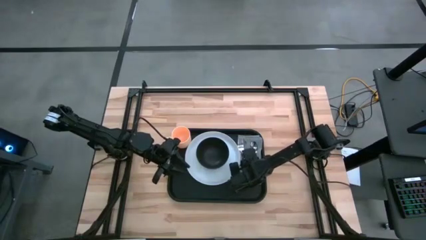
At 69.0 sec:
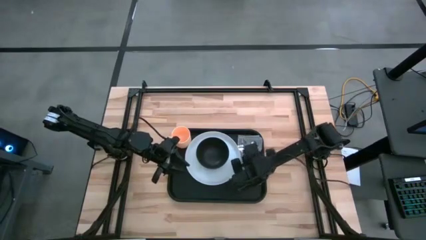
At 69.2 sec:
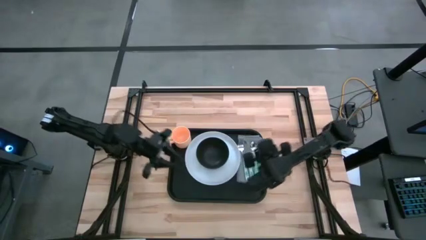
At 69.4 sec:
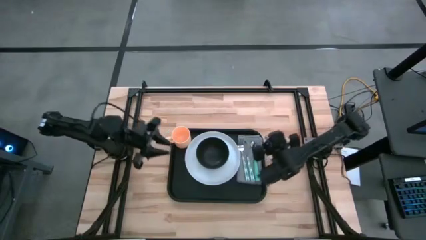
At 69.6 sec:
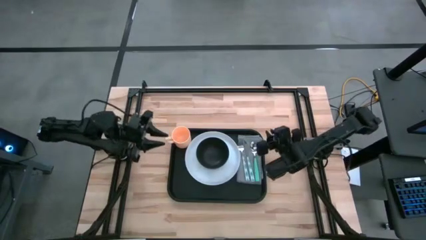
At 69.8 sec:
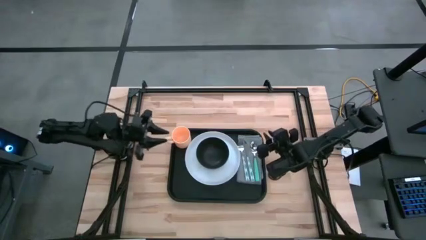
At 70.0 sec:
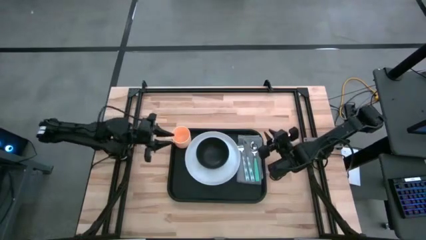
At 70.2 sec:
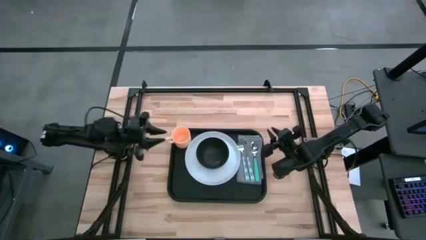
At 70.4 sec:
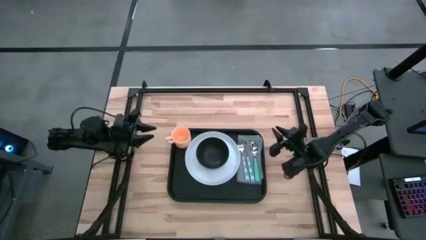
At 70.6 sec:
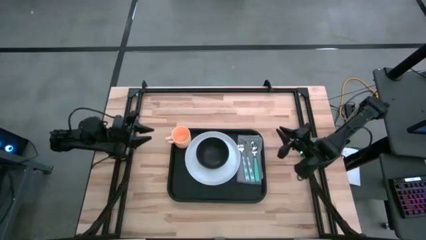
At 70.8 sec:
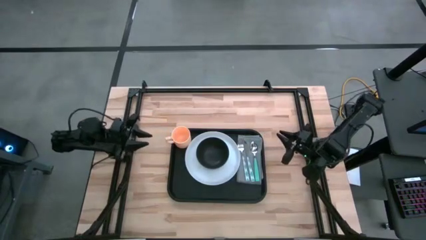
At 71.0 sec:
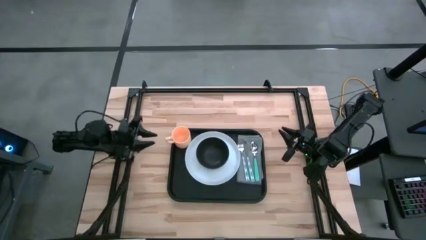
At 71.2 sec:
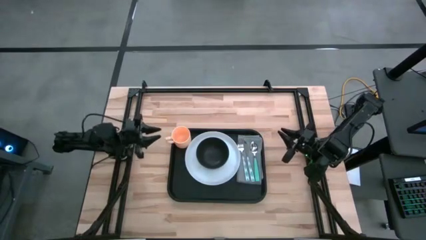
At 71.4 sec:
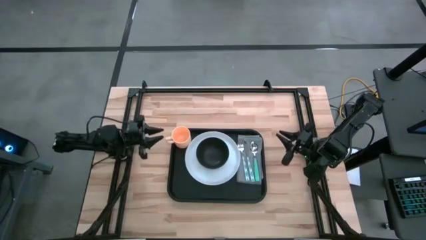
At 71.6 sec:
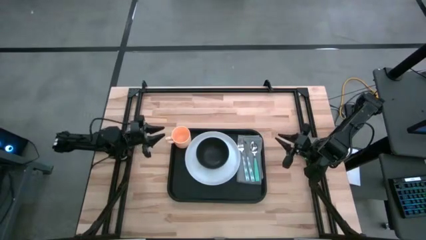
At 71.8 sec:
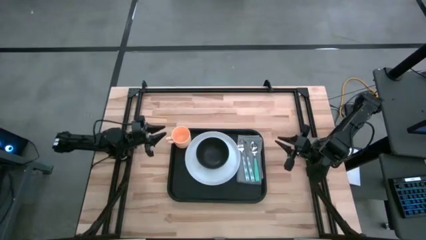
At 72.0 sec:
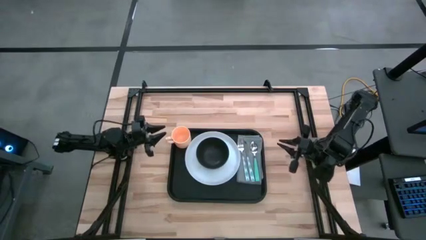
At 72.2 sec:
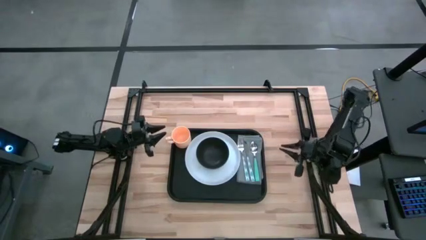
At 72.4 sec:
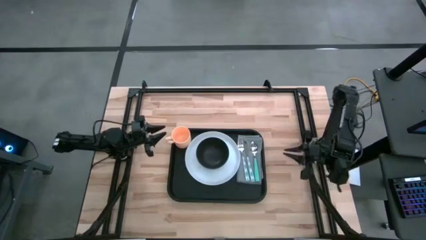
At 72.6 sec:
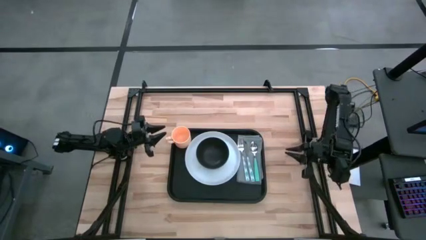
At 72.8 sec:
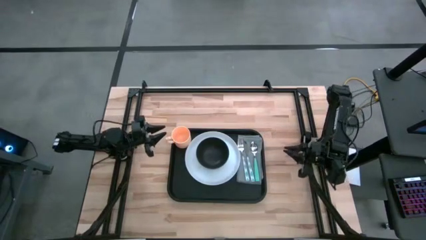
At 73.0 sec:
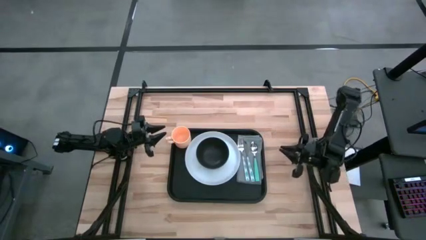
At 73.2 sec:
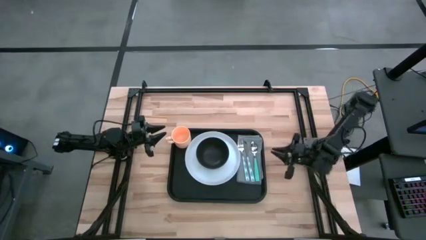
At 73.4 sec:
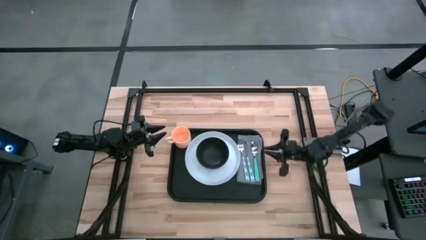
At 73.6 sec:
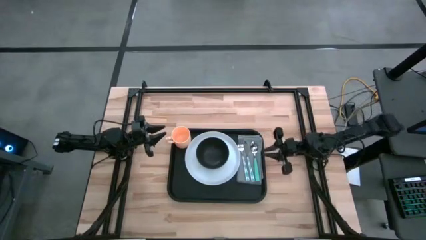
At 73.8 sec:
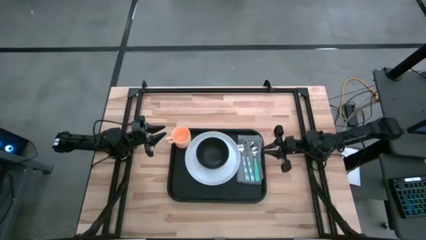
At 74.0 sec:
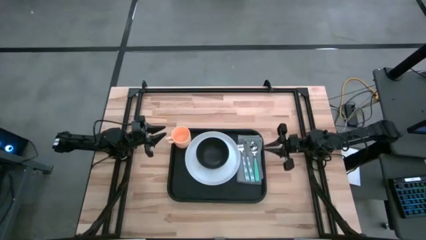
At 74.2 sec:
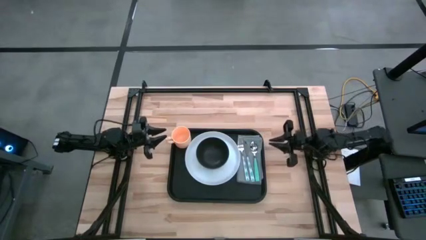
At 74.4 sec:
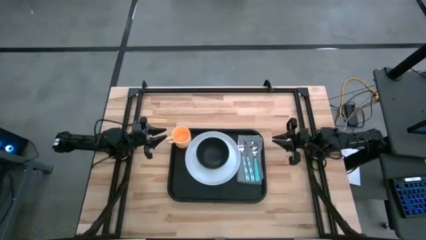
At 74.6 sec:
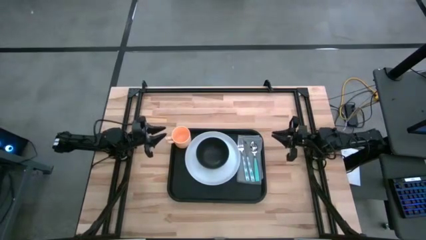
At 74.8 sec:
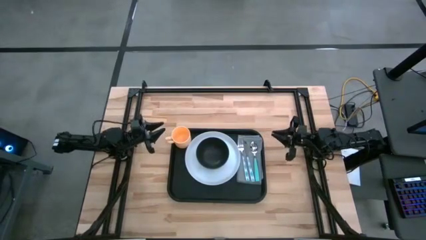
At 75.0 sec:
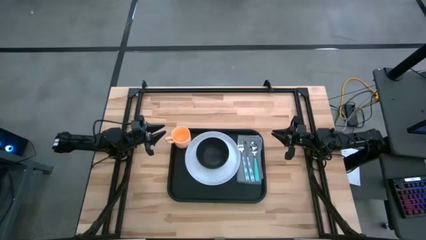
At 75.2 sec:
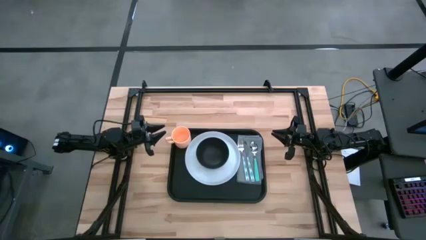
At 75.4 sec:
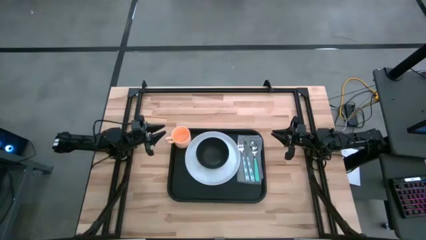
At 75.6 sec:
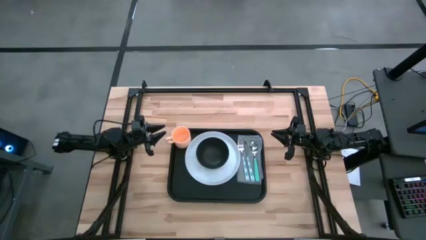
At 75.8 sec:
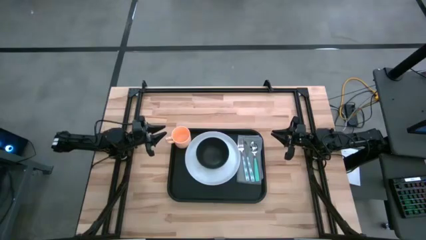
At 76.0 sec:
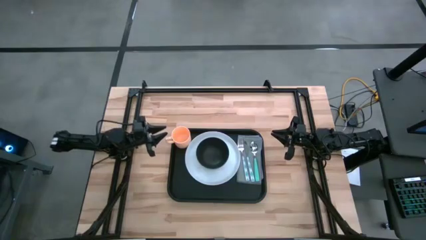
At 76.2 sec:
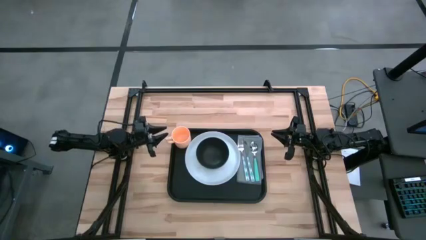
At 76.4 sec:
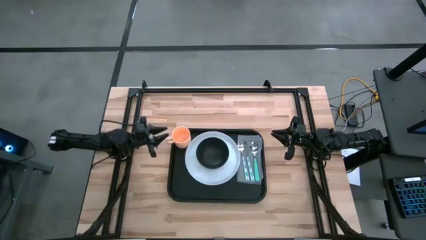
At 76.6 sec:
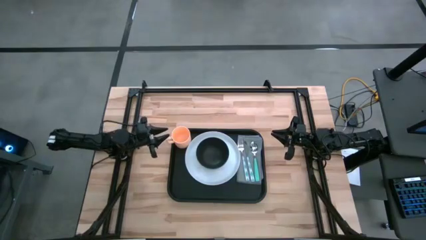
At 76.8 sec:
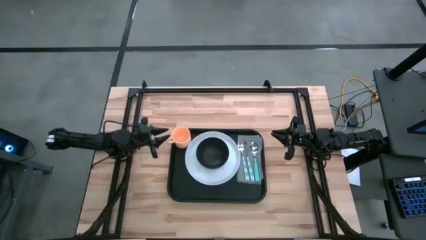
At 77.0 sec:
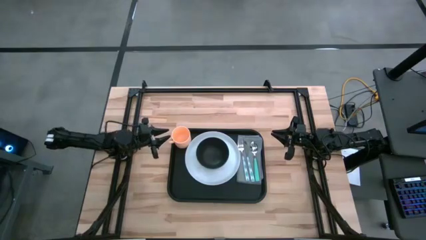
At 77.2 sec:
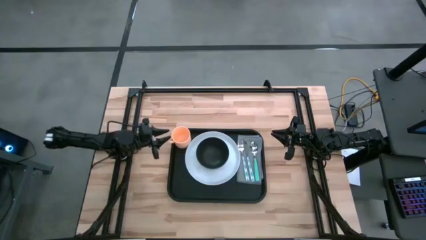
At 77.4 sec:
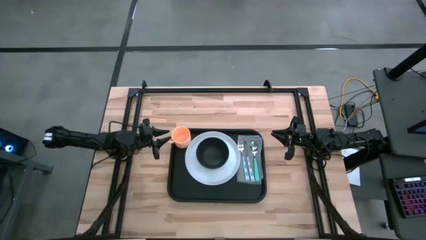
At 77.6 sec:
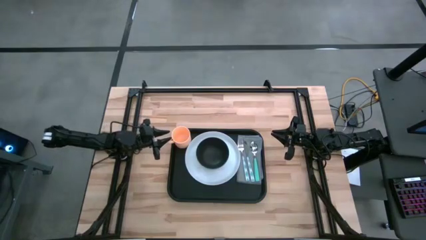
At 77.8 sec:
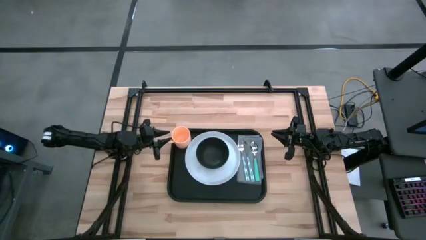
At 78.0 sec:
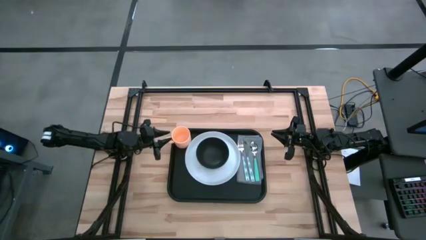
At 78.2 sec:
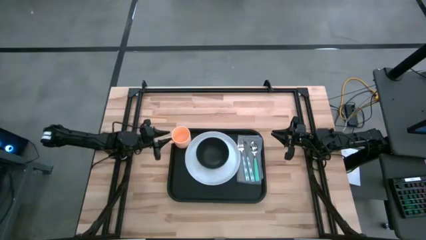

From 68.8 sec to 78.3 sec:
Task: Set up tray
Return to Home Position

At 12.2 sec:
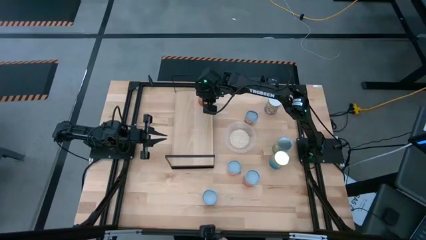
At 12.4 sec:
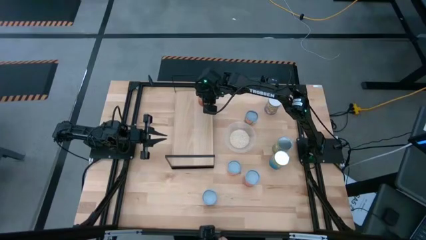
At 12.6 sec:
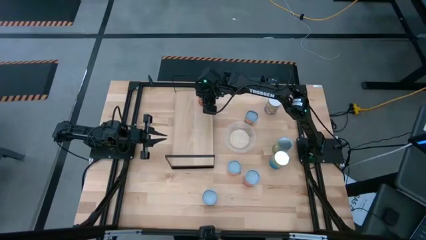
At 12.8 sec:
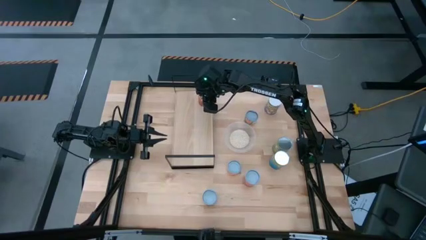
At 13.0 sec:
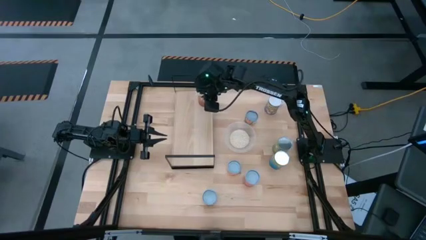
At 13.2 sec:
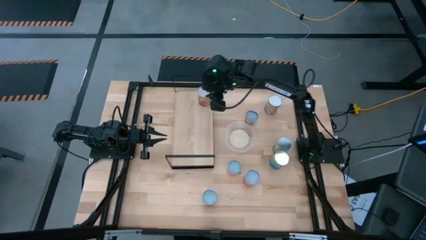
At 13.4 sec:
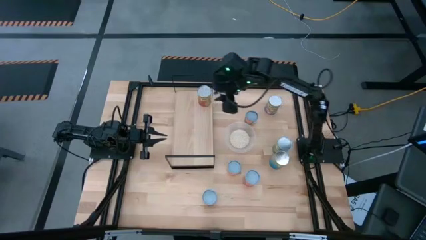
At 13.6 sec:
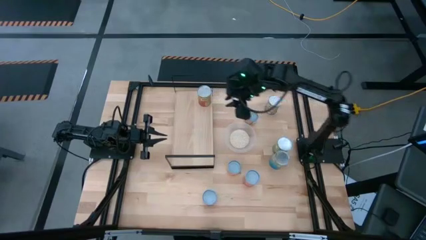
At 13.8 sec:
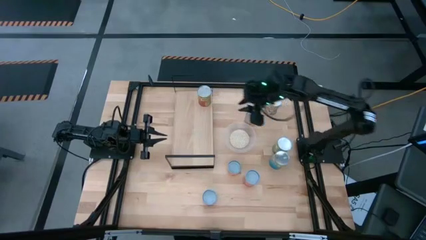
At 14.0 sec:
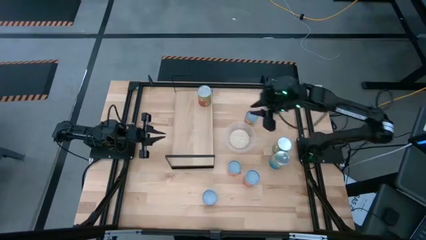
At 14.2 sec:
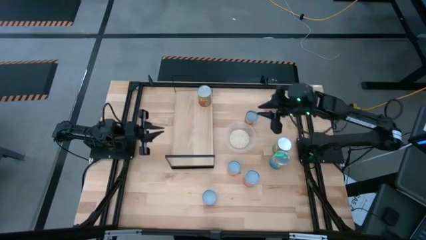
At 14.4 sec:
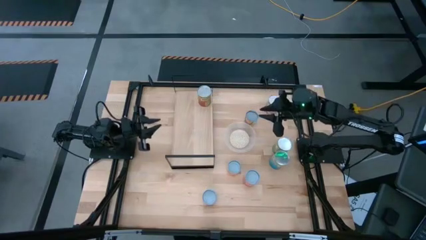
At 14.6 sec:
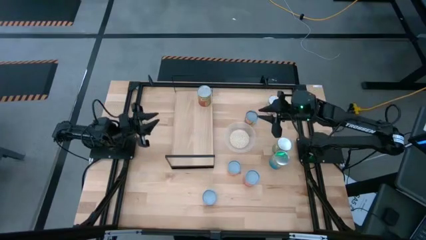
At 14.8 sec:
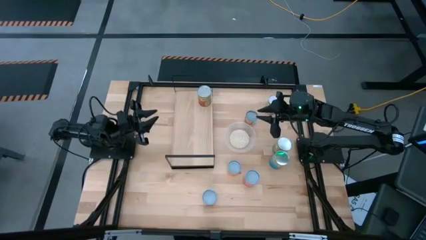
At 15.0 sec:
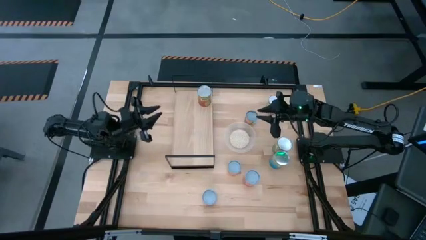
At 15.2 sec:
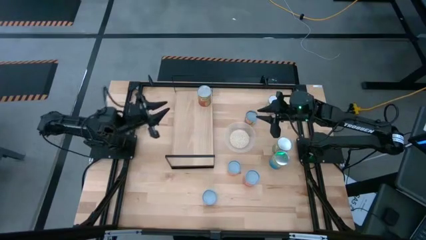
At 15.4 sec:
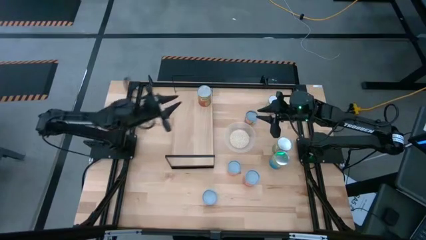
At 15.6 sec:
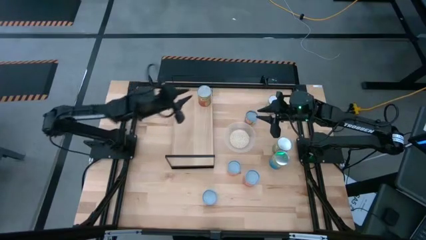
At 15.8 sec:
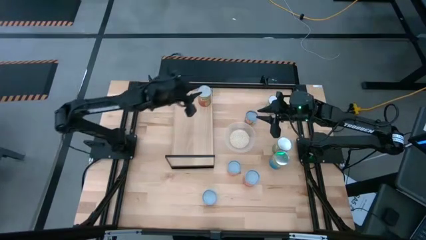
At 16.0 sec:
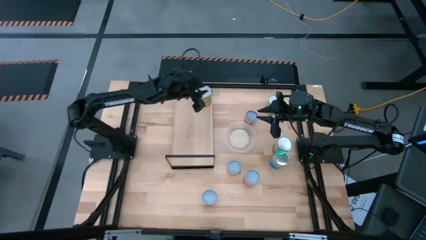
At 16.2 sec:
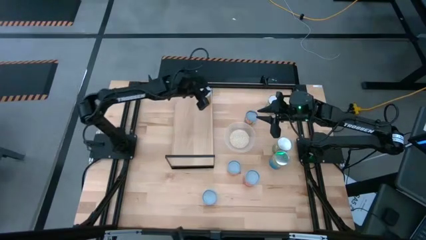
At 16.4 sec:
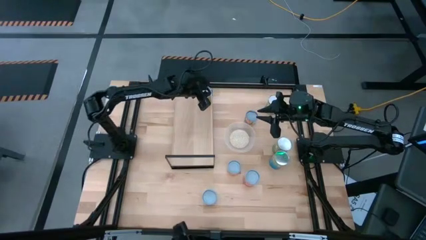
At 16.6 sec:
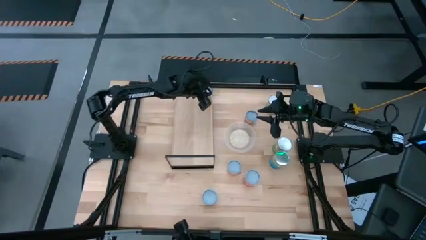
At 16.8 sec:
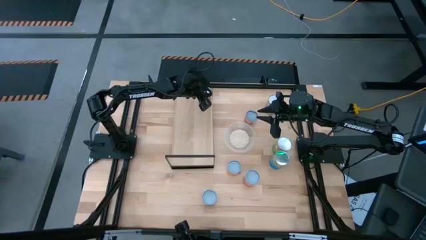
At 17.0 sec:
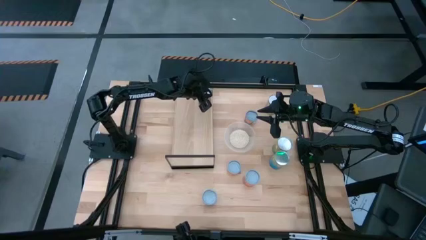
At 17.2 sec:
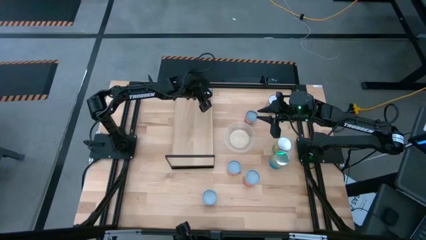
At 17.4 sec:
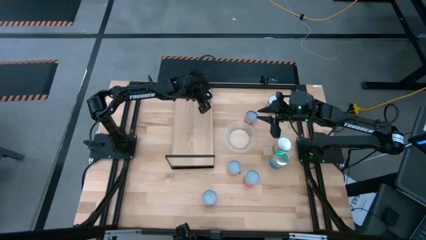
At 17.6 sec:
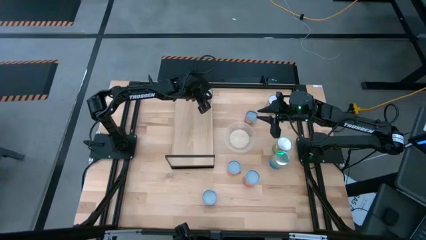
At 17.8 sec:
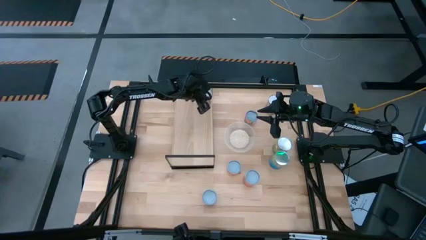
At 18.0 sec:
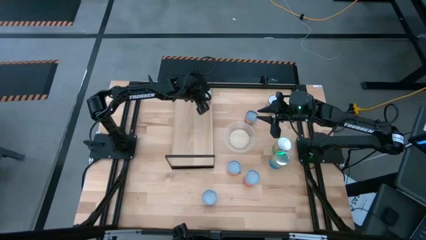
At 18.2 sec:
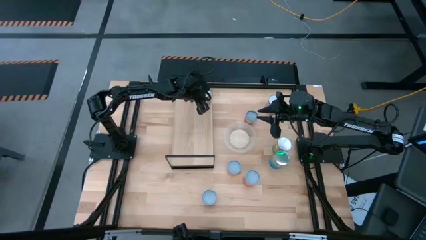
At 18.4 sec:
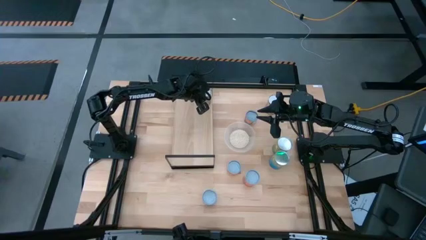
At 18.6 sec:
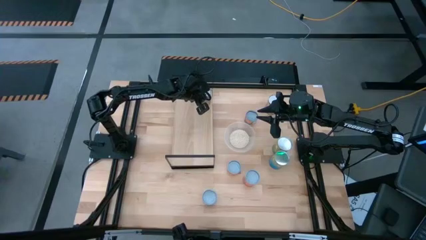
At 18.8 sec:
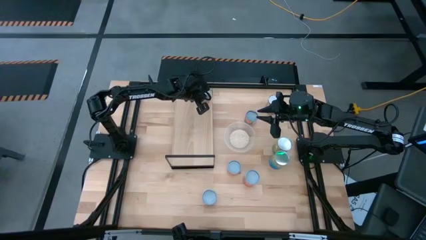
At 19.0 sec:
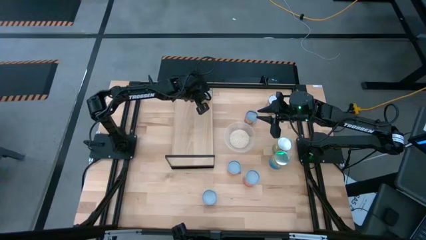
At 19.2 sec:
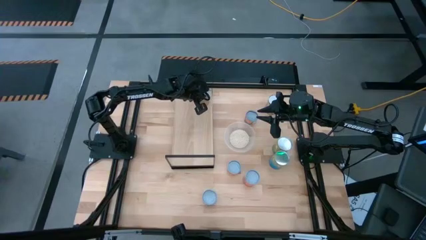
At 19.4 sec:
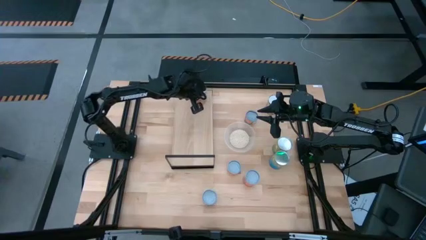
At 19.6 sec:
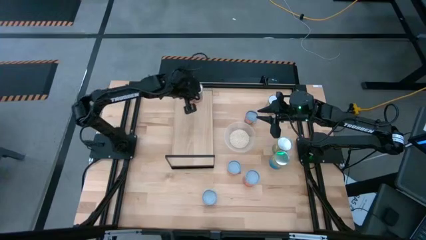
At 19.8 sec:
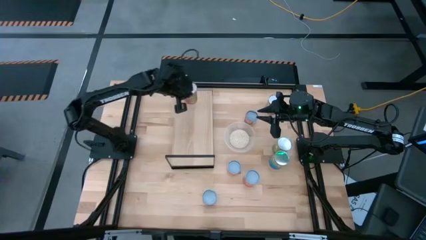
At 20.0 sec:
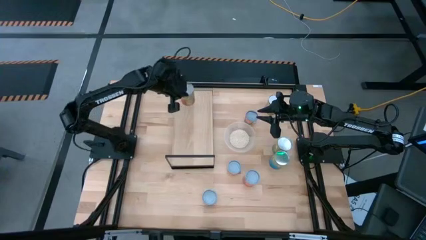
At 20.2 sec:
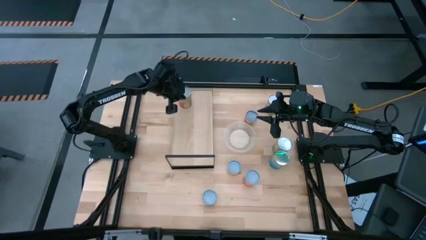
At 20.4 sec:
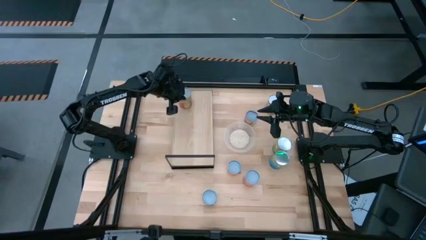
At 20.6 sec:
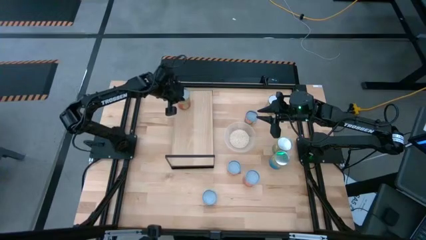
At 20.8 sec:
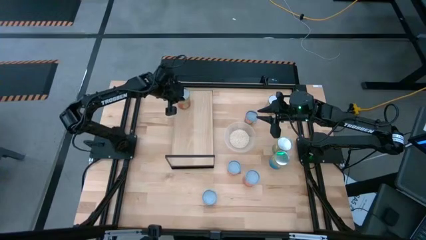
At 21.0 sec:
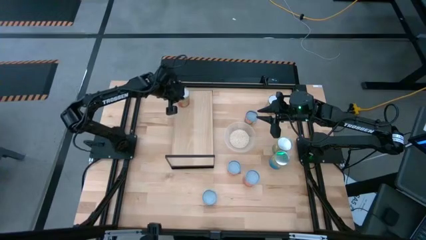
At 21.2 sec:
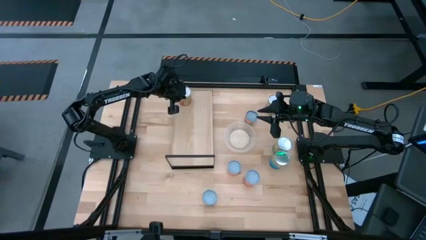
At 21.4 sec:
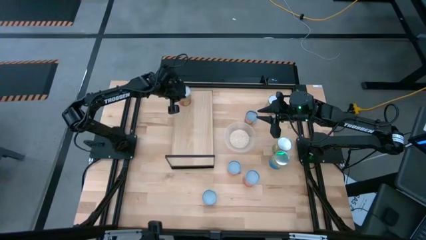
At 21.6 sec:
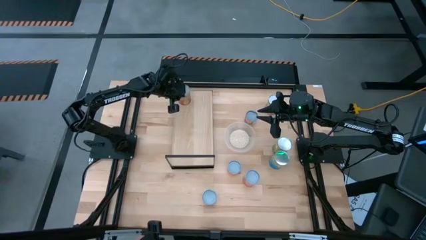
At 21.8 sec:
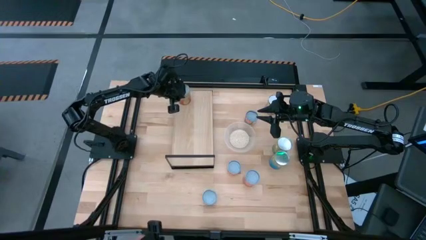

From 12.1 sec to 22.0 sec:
Task: Pick and place cans onto a shelf
Put the large canned pineapple on the shelf
